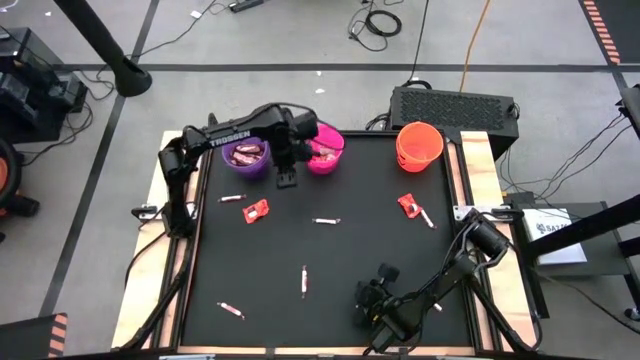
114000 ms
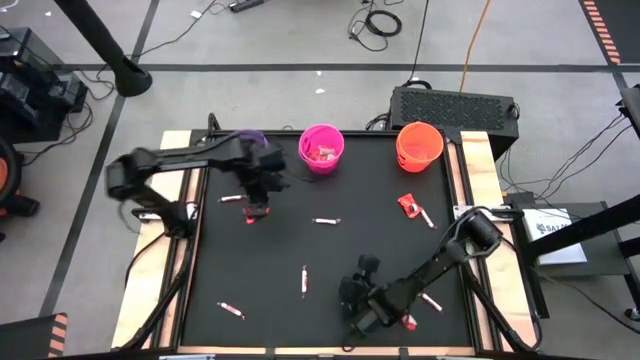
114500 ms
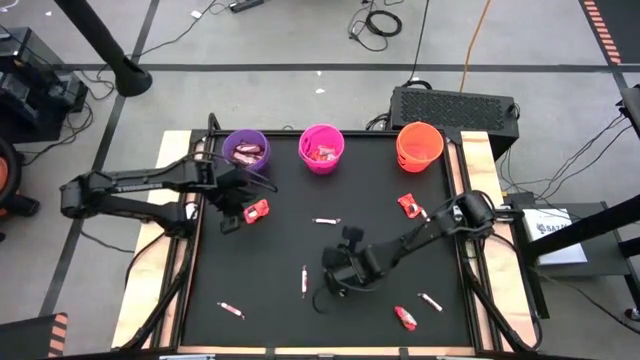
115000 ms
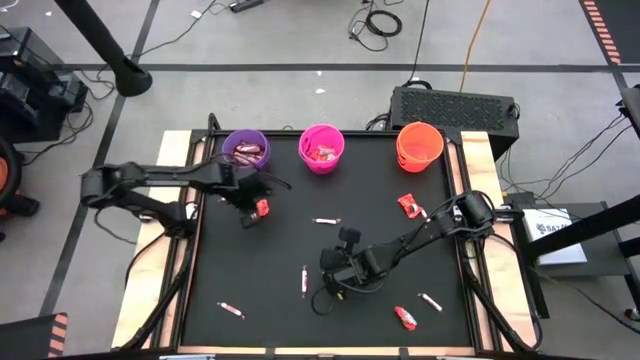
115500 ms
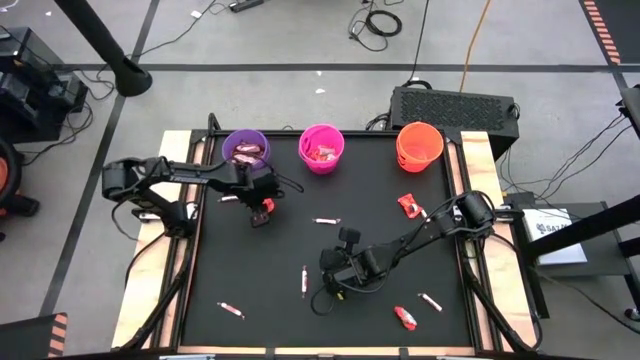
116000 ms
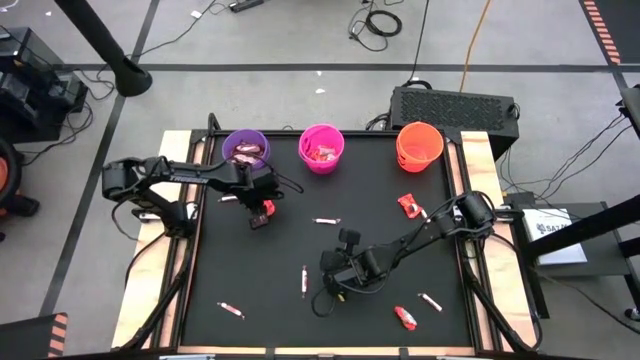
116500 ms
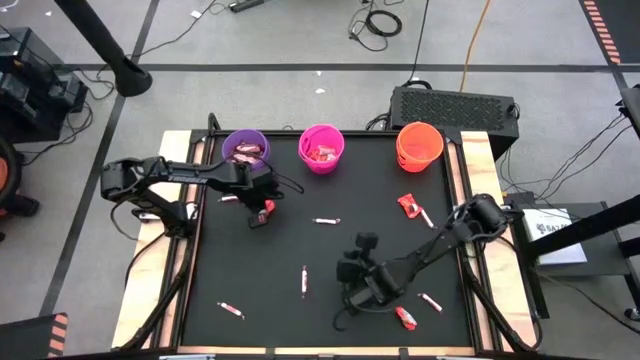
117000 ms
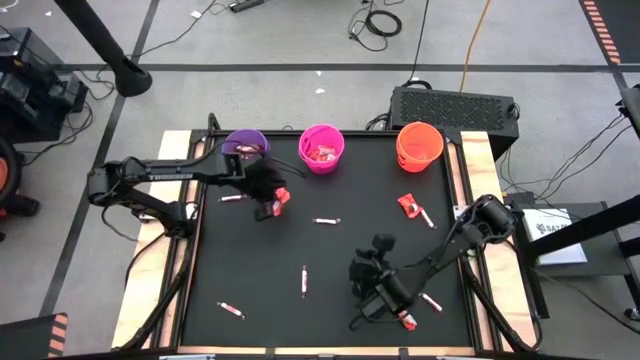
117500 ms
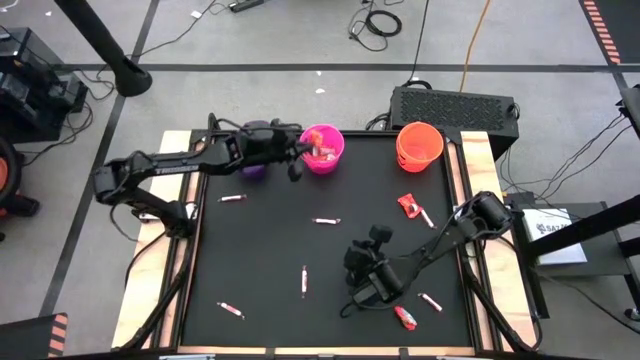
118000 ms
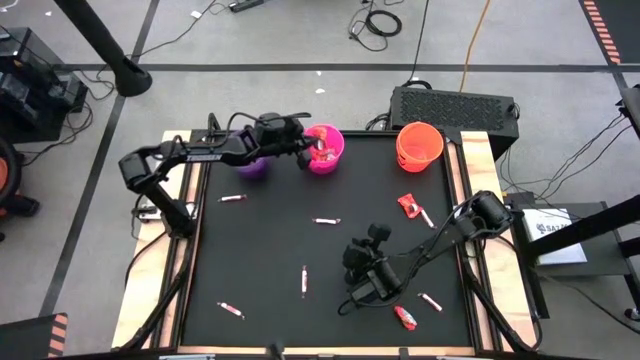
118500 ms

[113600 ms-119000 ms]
Task: Sort candy by brand, put in halloween buckets
Put the red chocolate bar into the pink bucket

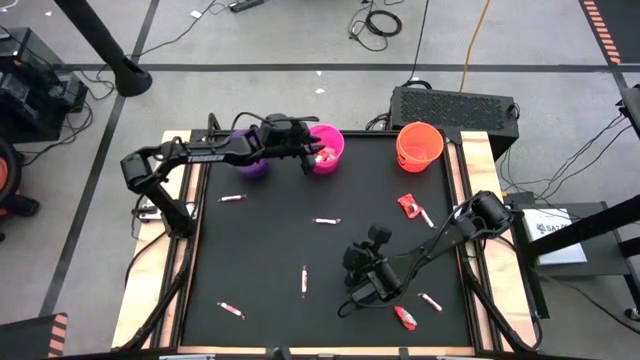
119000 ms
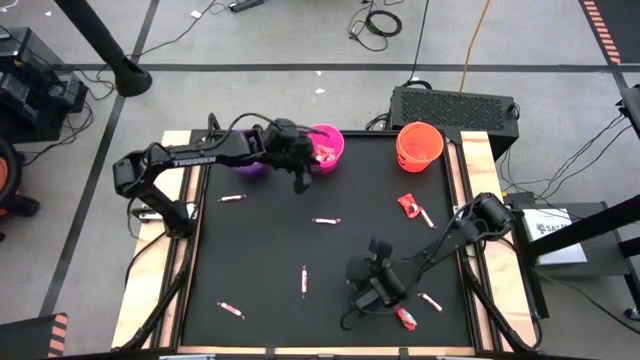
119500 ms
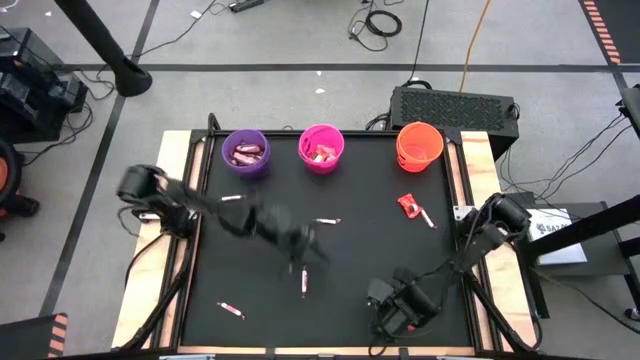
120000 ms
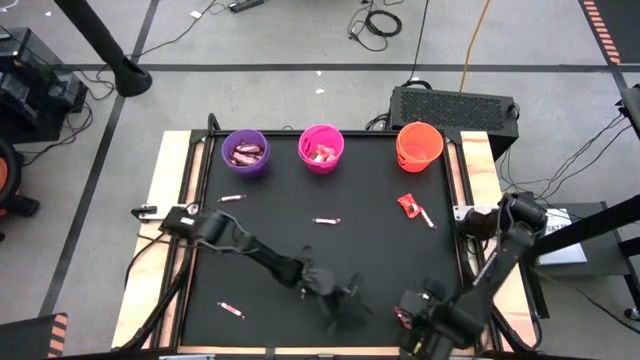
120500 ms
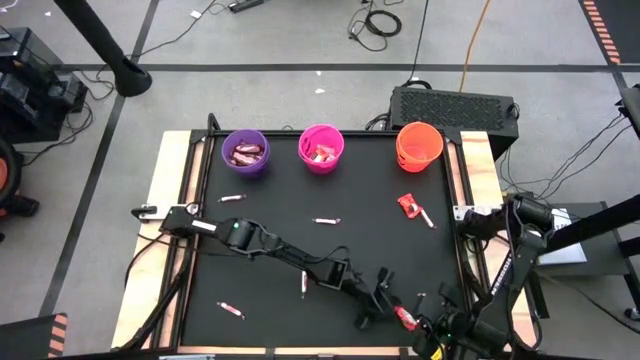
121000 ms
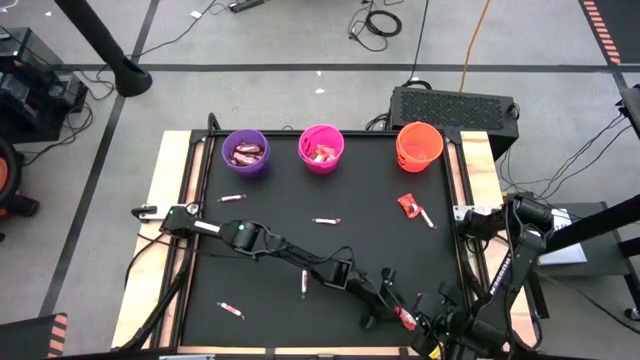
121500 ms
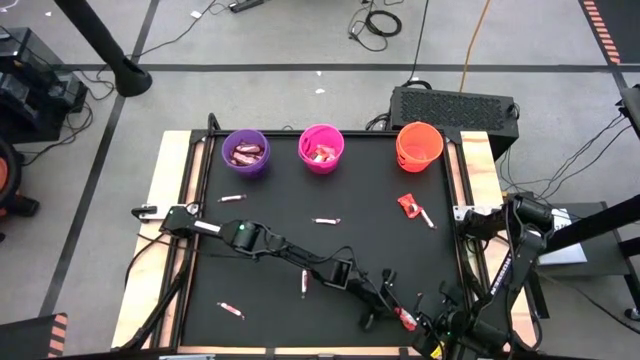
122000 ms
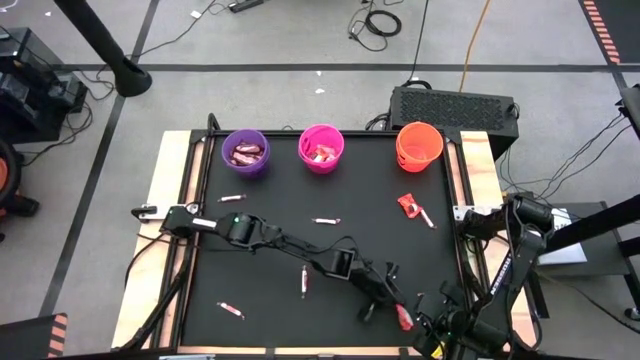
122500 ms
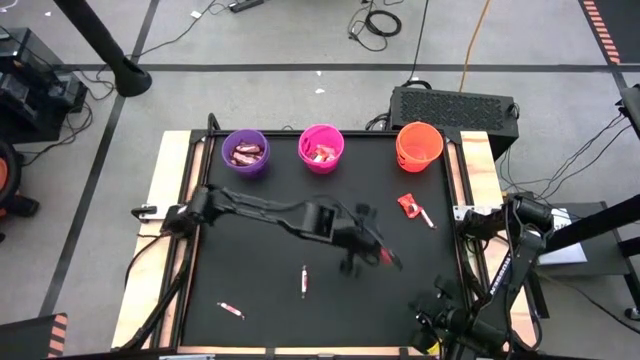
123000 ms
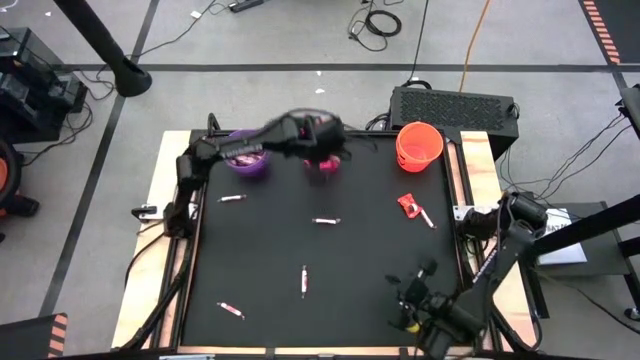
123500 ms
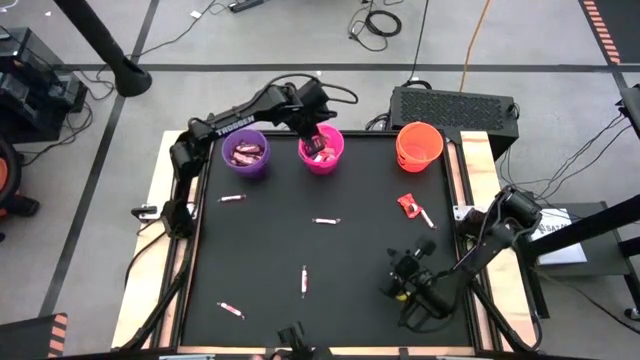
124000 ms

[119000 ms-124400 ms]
Put the red chocolate bar into the pink bucket

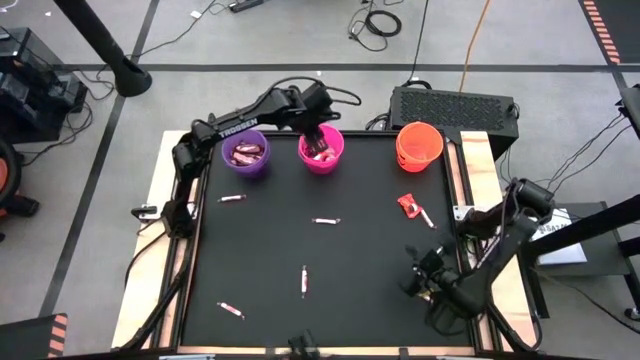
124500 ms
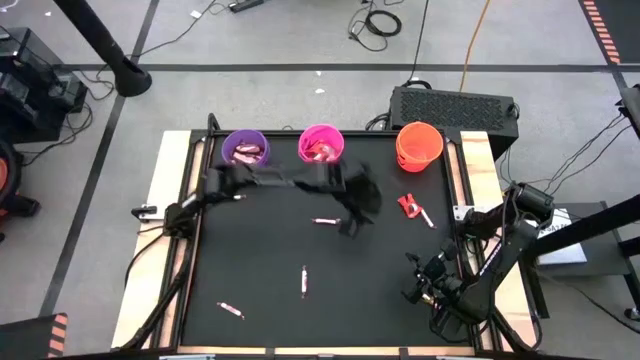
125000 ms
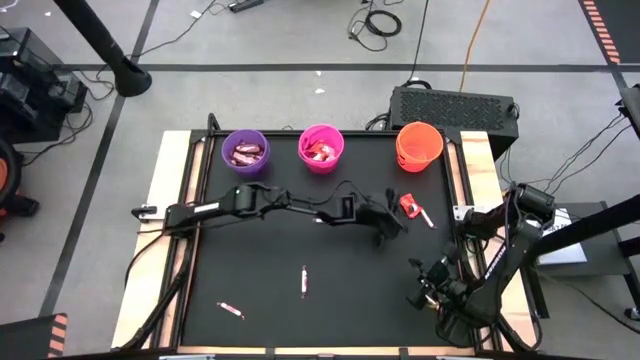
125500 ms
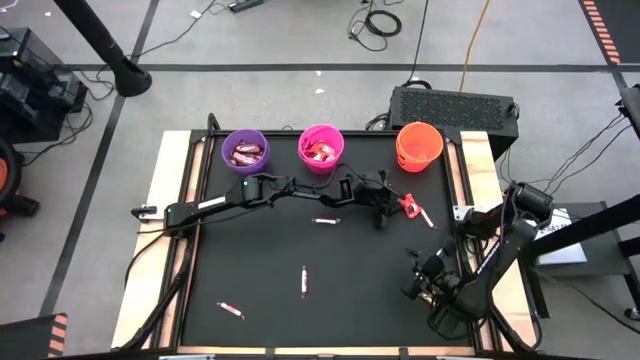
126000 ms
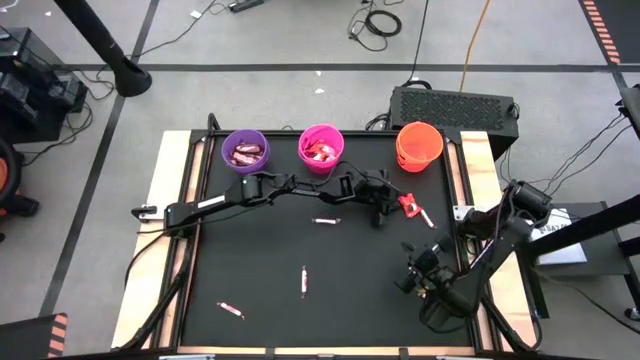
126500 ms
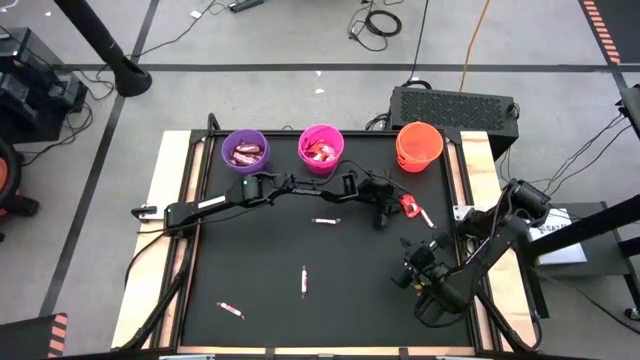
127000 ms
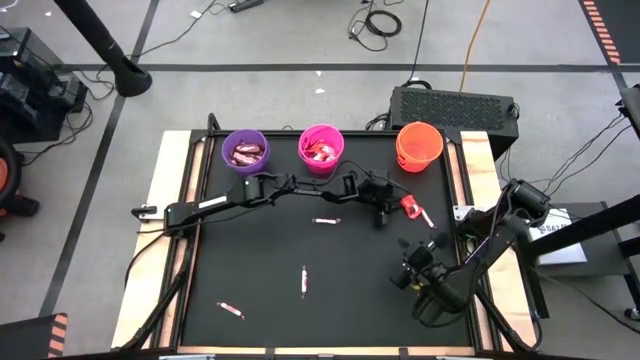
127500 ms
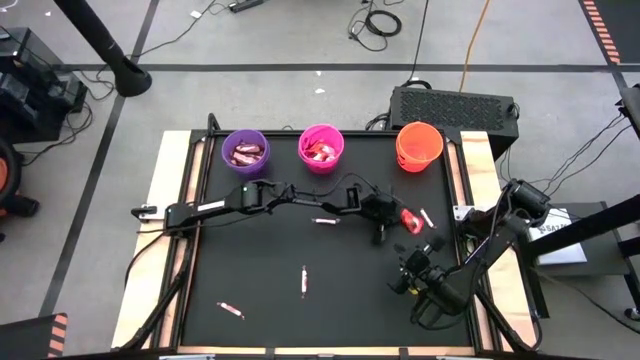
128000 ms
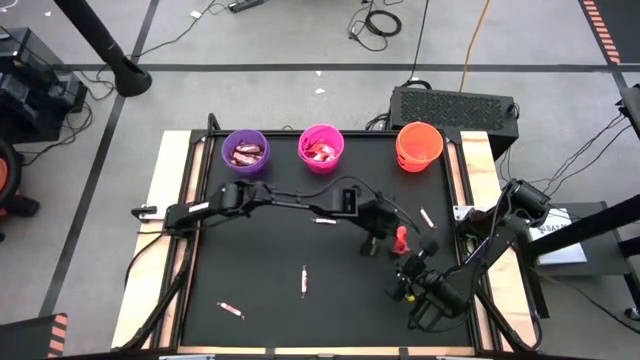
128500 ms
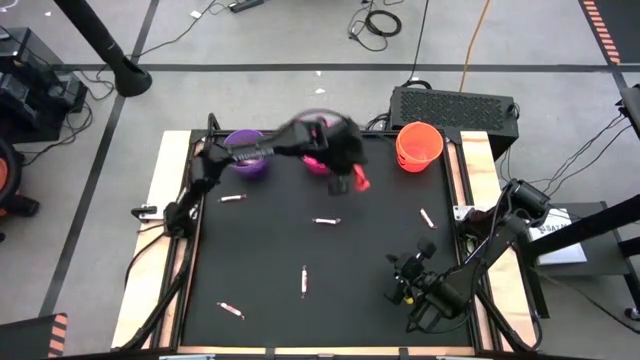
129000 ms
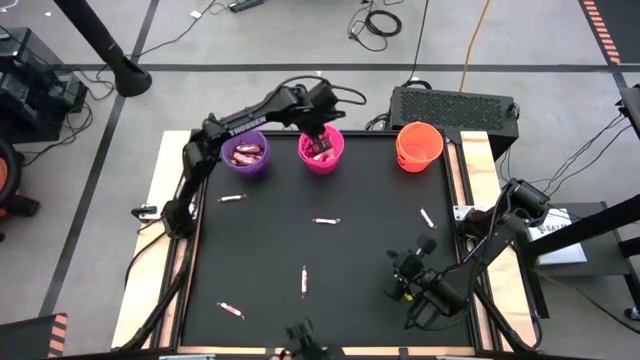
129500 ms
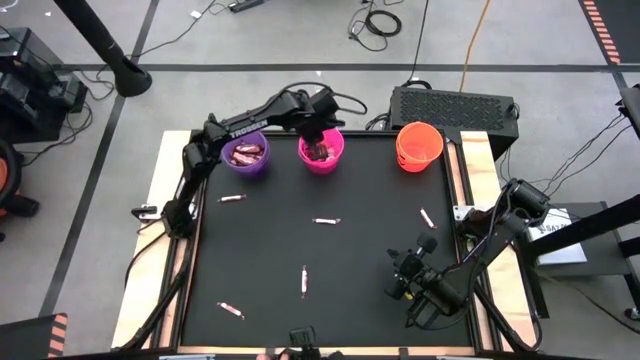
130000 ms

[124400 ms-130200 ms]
Put the red chocolate bar into the pink bucket

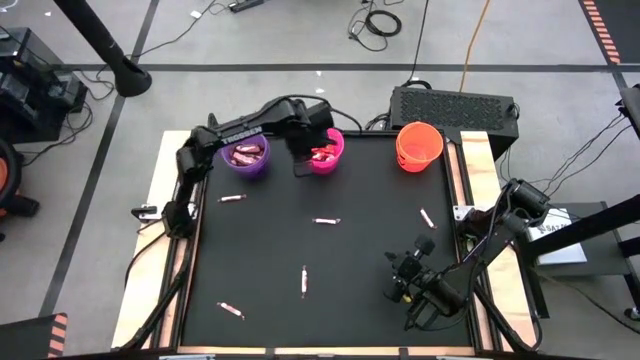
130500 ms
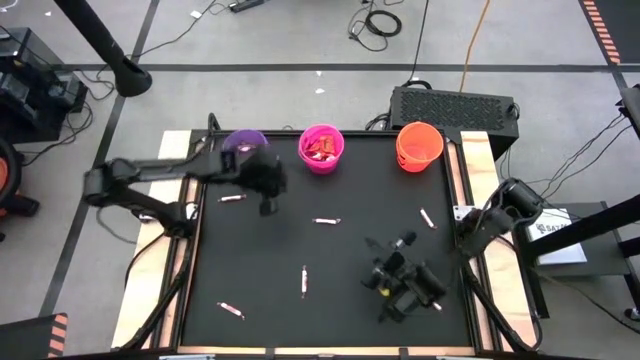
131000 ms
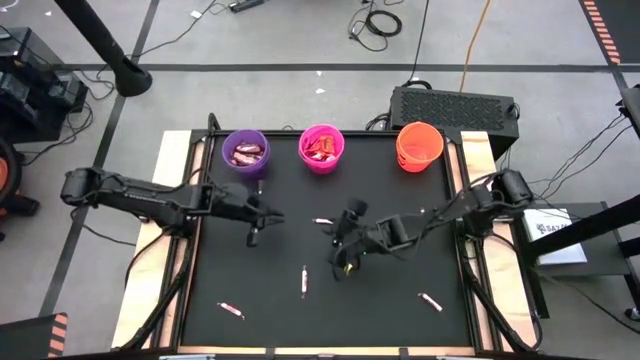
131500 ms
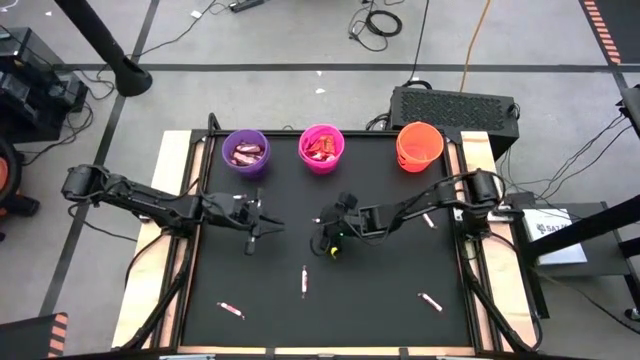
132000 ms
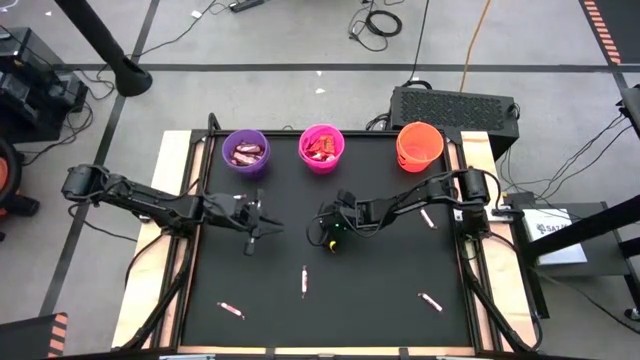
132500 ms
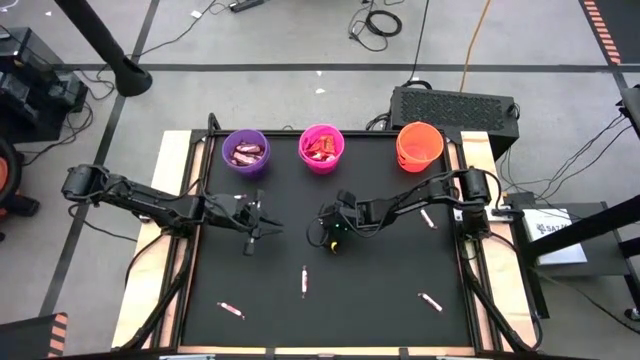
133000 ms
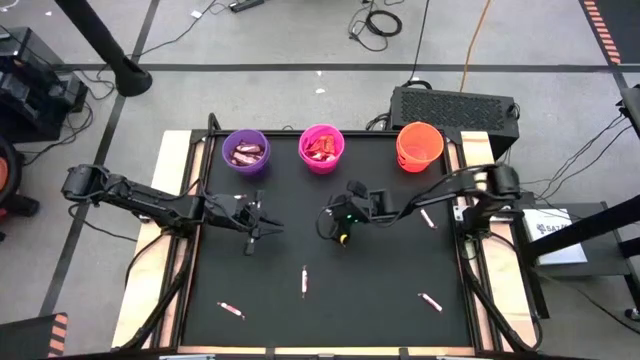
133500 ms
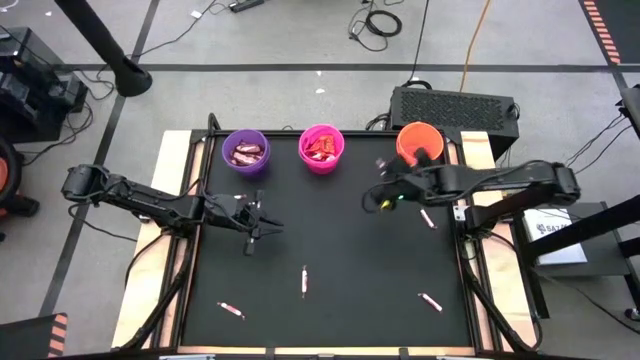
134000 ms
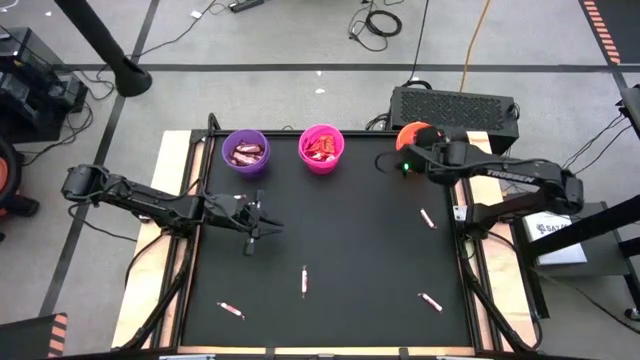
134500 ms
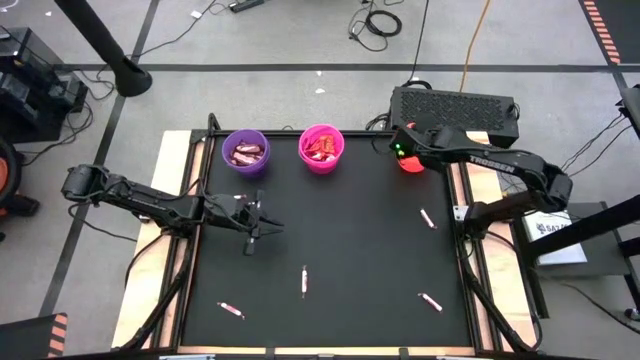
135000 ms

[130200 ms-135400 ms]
Put the white candy into the orange bucket
